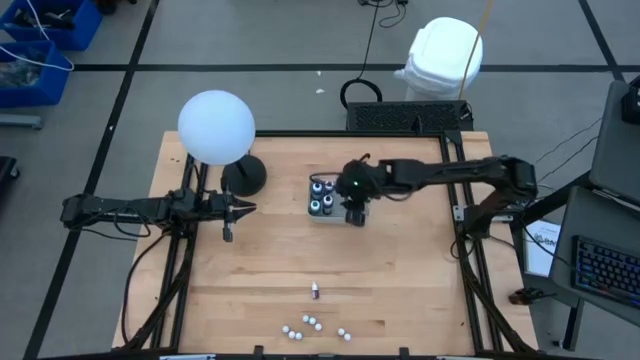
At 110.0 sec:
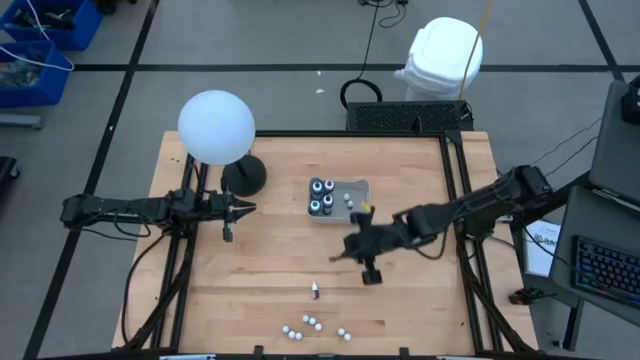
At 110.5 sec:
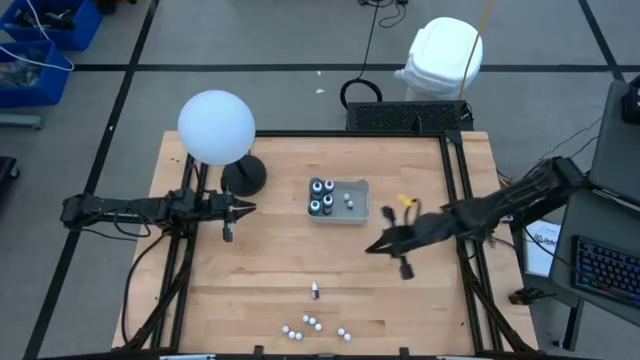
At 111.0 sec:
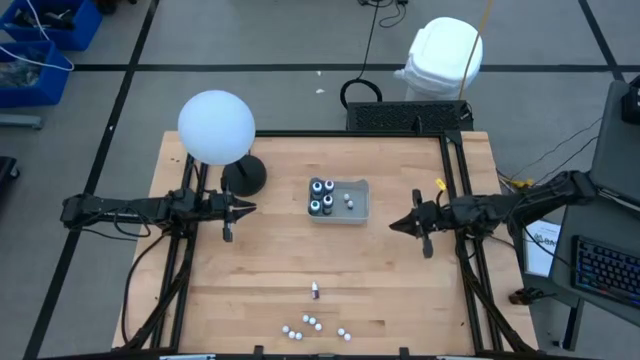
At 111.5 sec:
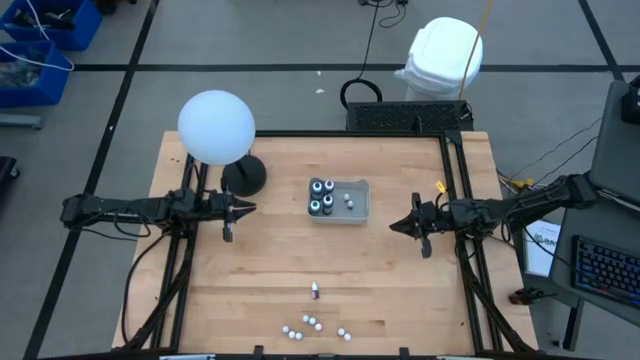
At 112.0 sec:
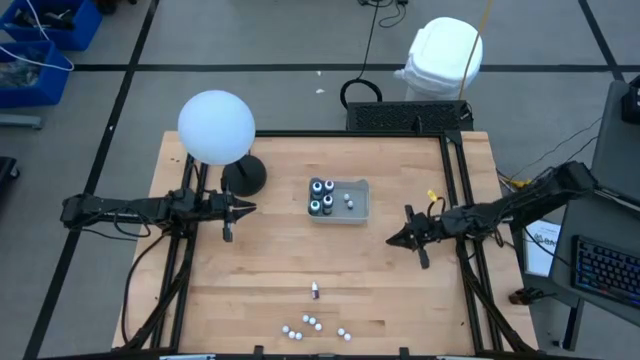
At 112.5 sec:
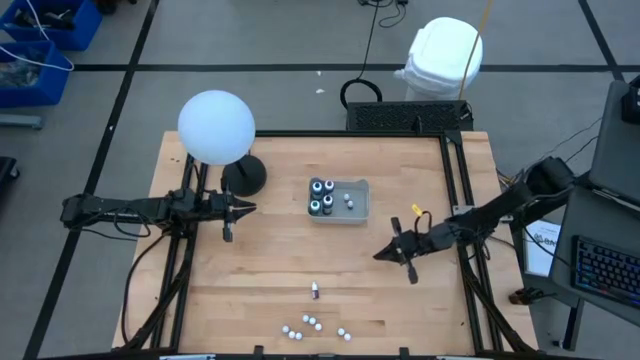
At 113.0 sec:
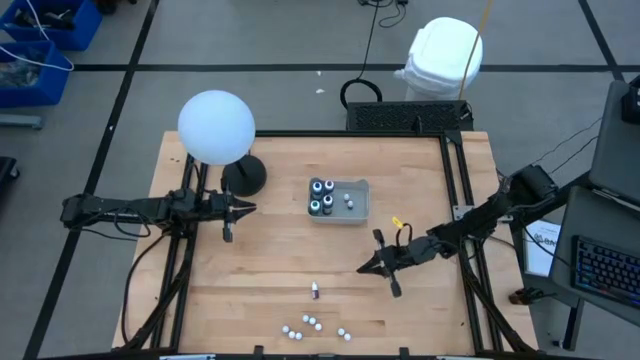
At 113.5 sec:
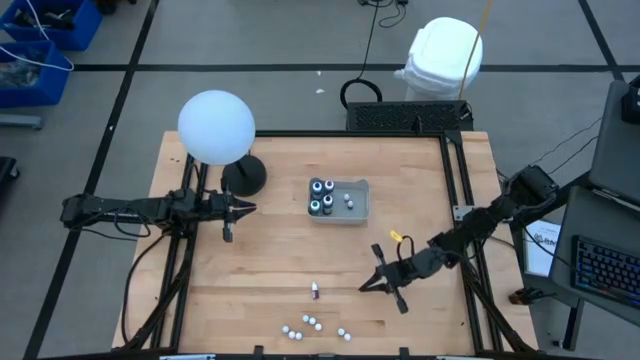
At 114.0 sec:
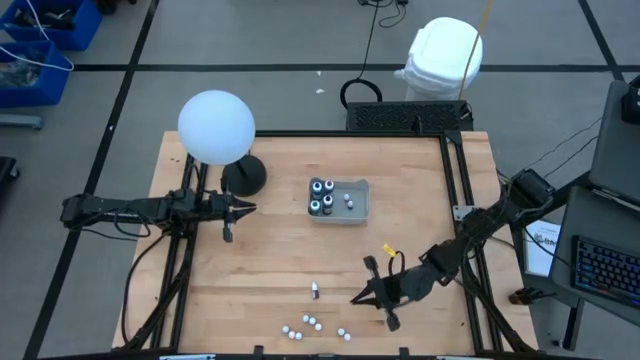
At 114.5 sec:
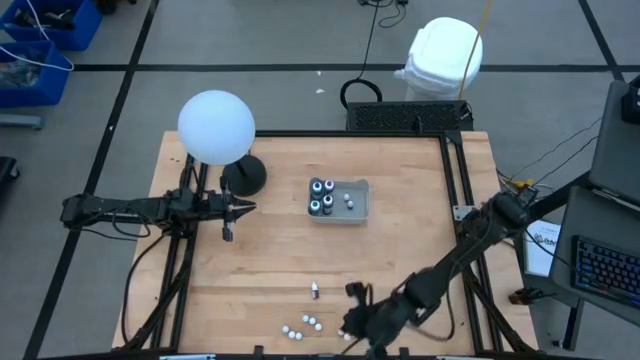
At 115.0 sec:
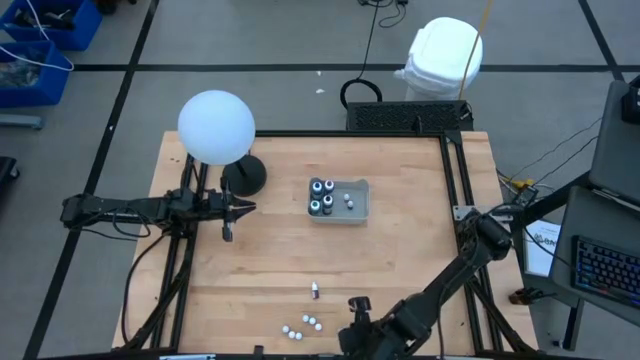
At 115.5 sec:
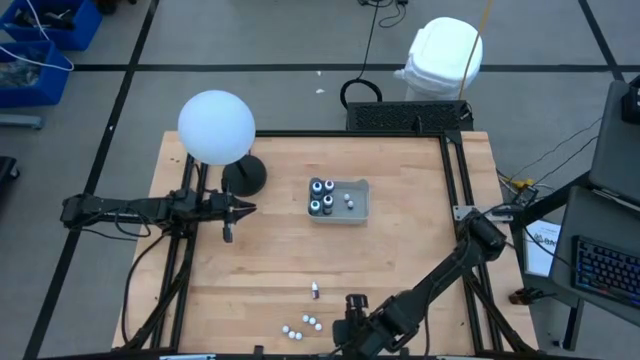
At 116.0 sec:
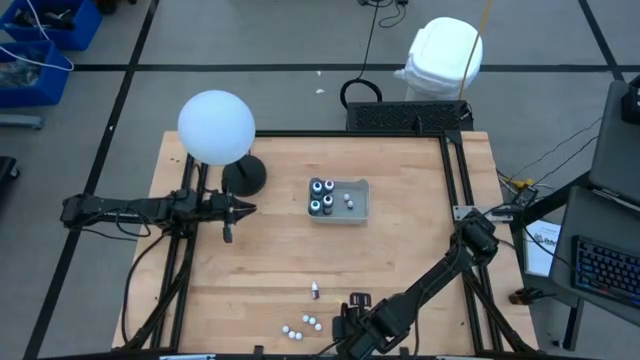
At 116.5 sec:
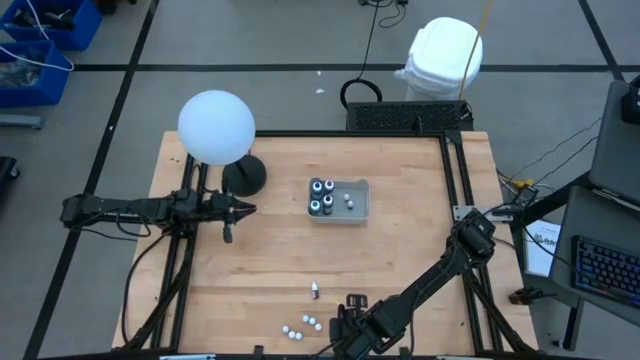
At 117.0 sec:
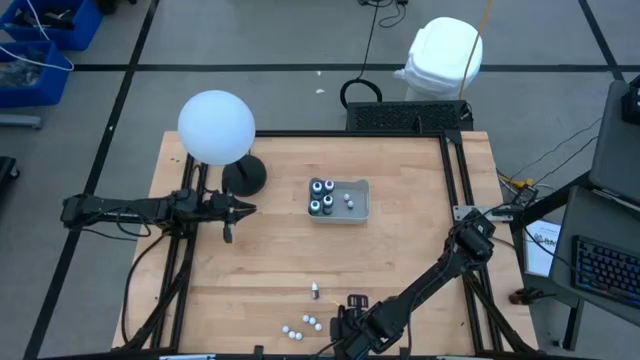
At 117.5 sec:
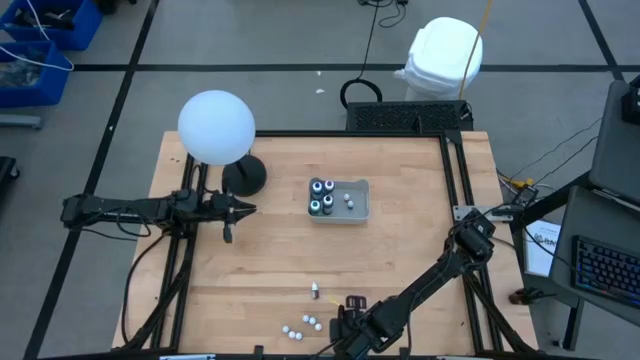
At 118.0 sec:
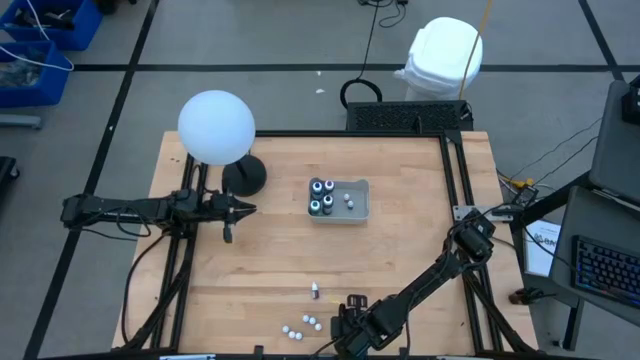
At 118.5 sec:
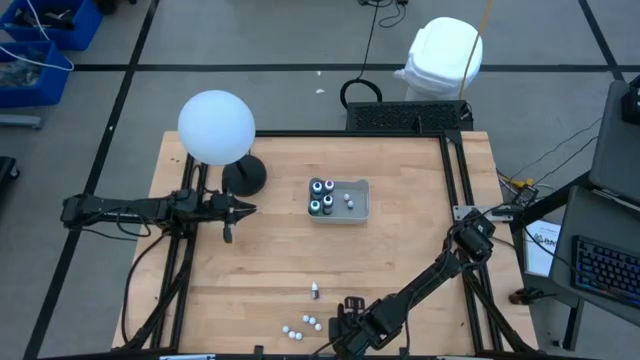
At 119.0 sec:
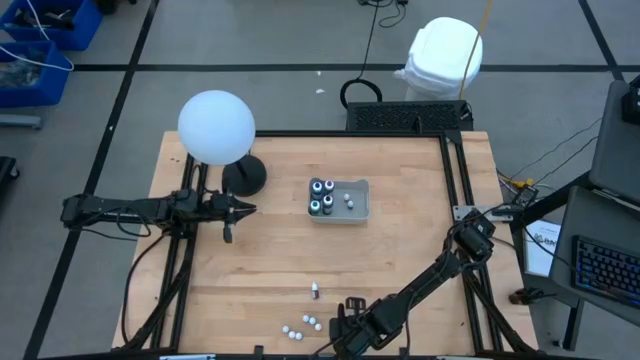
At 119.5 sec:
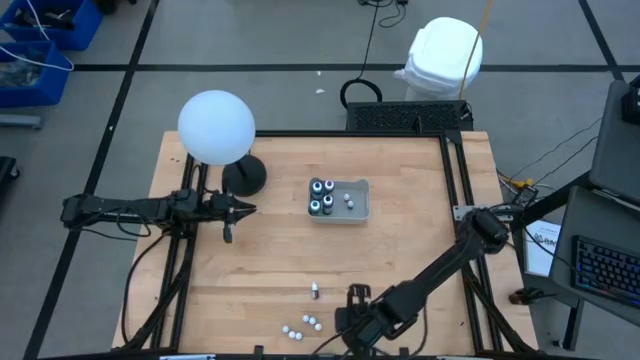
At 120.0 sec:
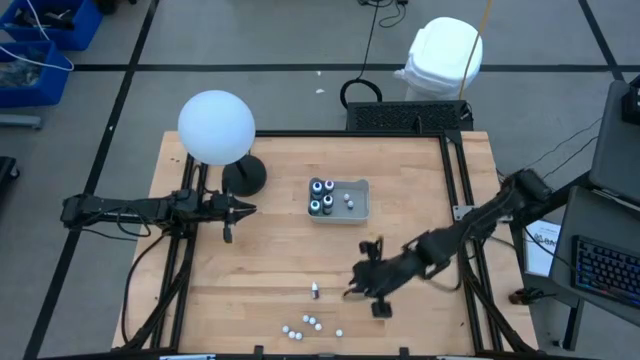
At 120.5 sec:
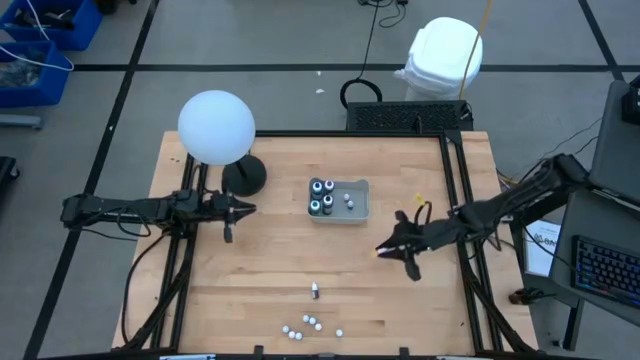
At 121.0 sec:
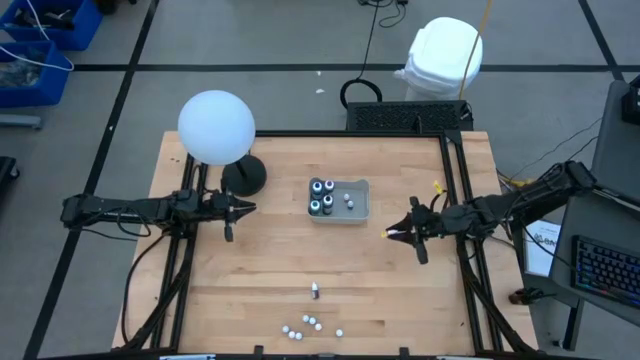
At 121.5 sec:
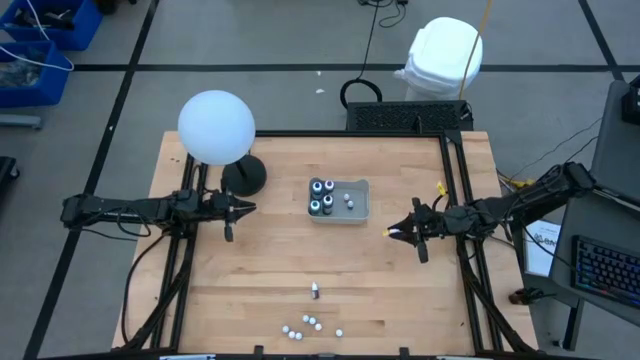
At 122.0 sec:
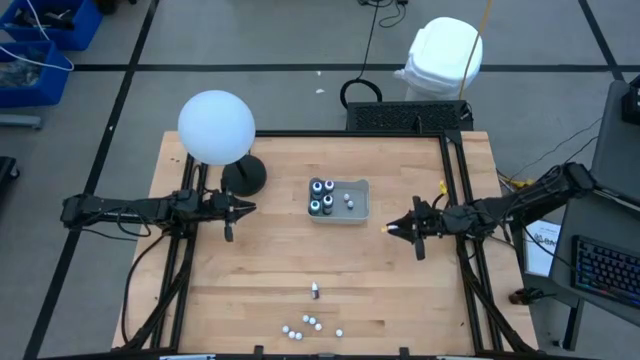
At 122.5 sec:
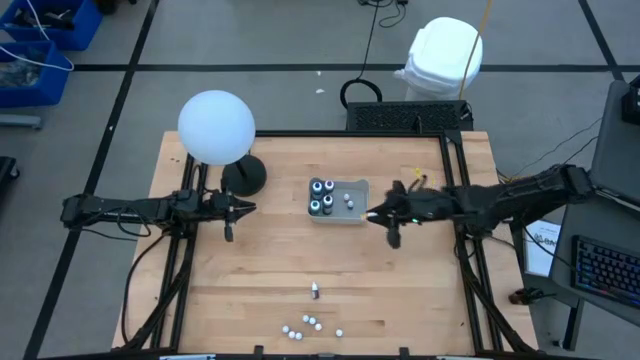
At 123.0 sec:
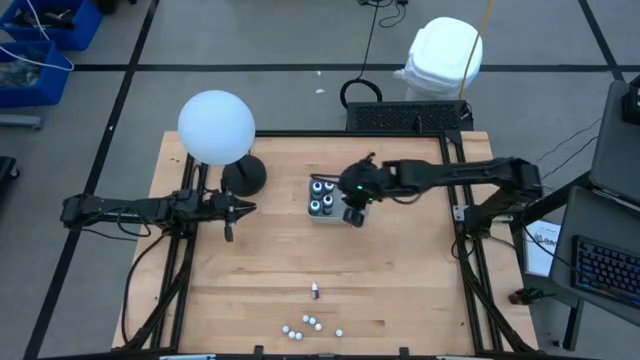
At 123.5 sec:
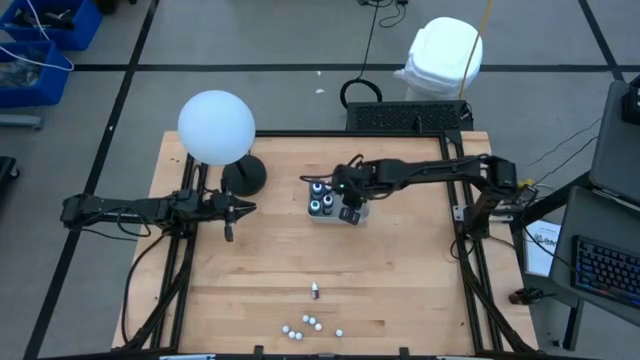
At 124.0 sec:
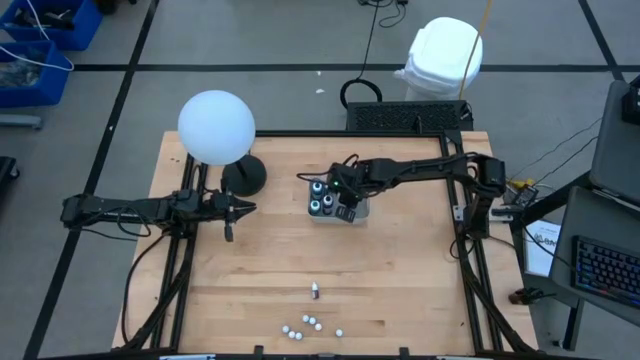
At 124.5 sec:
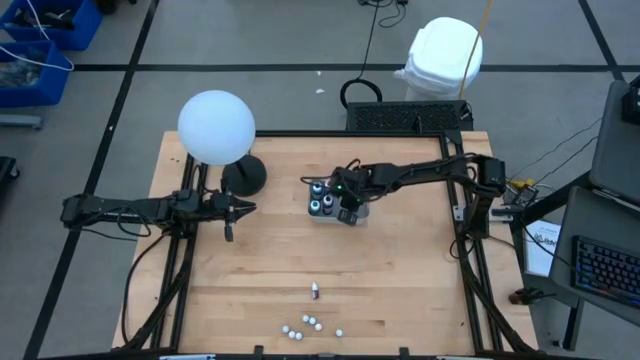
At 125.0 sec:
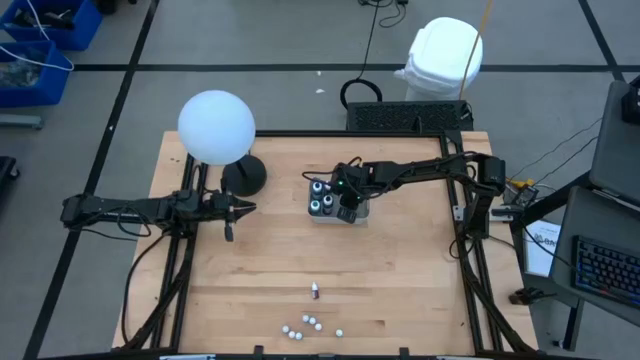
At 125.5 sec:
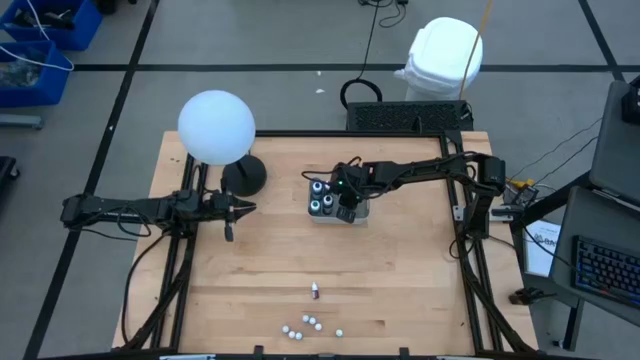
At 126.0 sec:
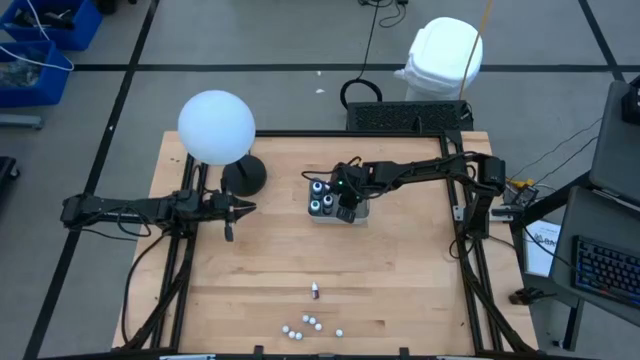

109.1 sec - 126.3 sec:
Task: Pick & Place food coloring
Put the right small orange food coloring bottle into the gray bin

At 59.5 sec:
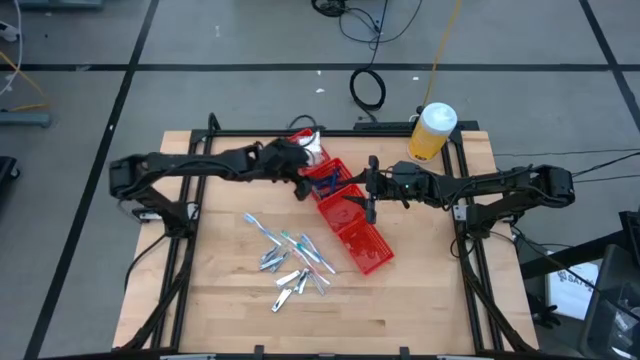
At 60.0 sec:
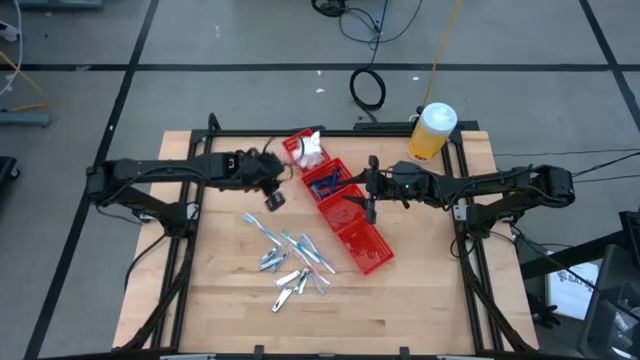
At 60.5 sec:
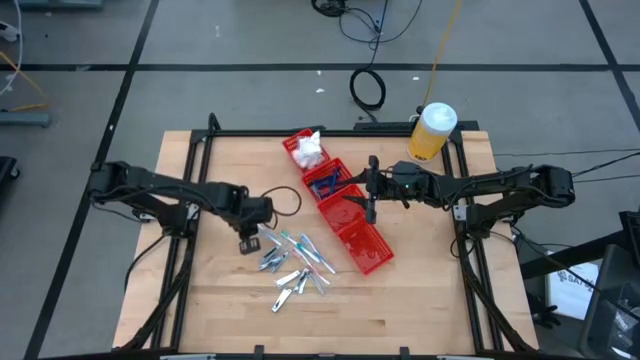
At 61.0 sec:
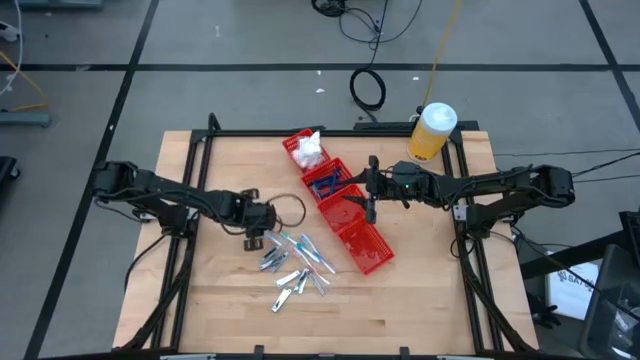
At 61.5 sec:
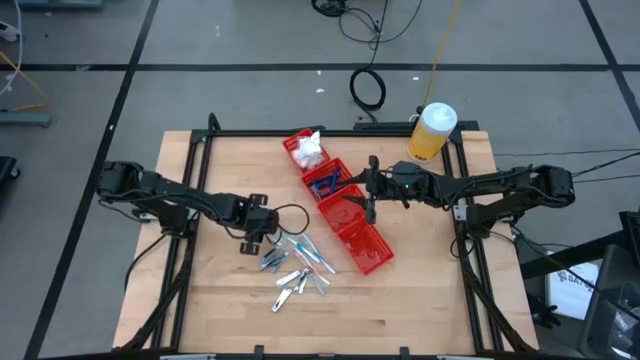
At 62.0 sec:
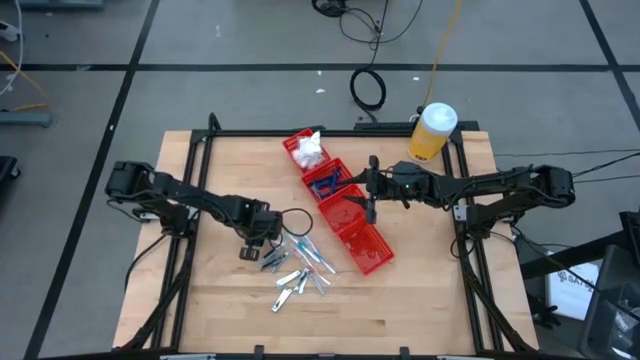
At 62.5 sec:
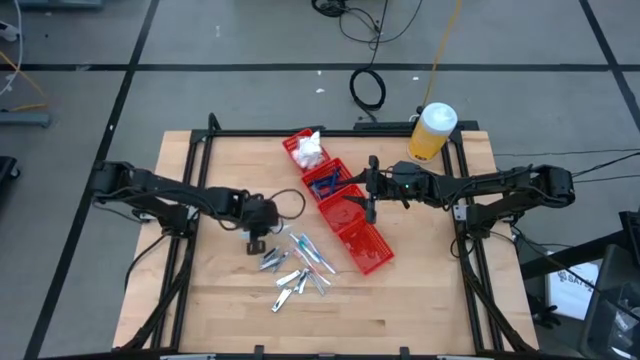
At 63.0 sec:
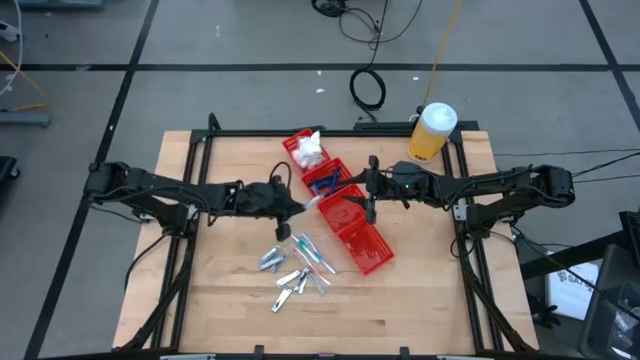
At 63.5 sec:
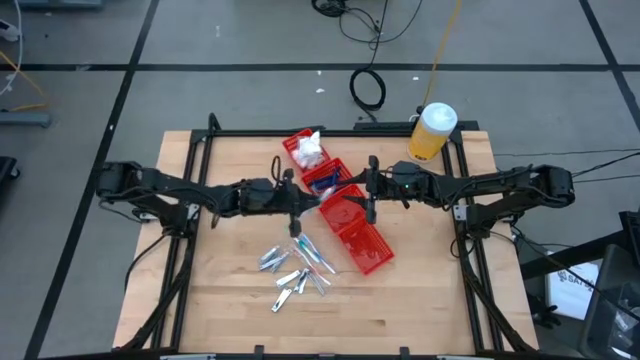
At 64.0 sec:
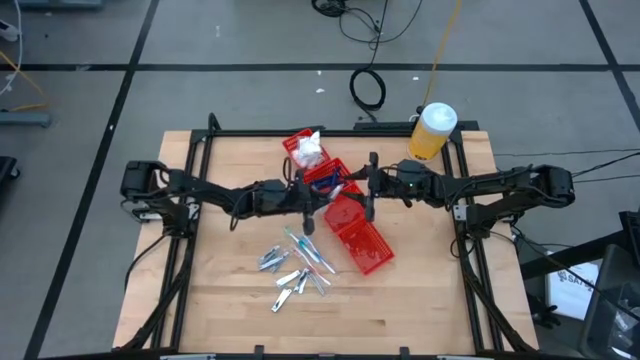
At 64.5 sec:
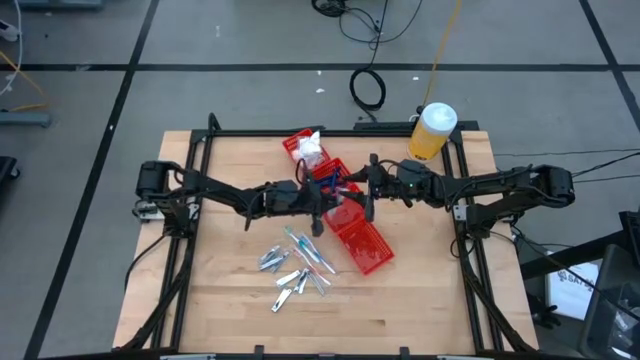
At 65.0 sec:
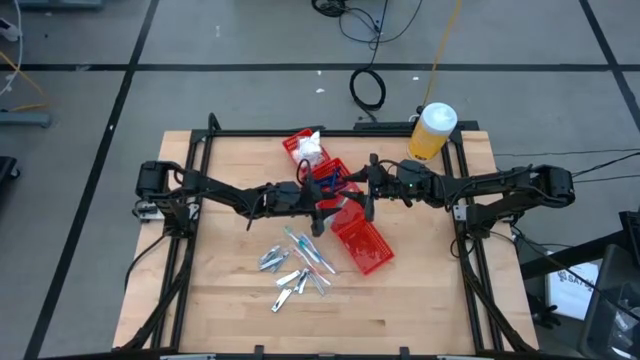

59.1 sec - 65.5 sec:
Task: Pick & Place Travel size toiletries
Put the blue toothbrush into the bottom middle red bin
